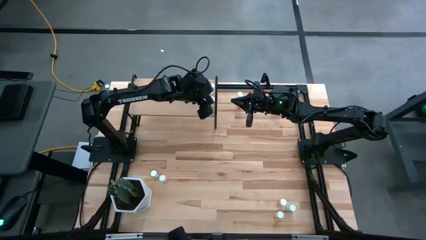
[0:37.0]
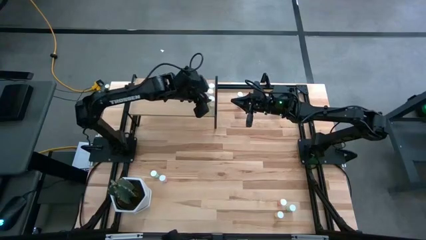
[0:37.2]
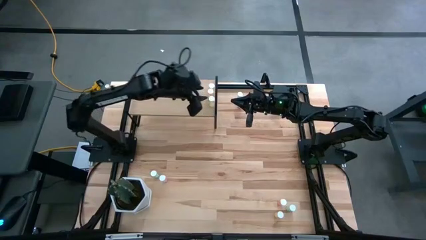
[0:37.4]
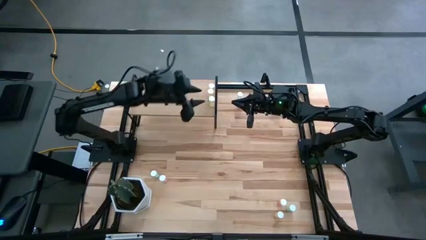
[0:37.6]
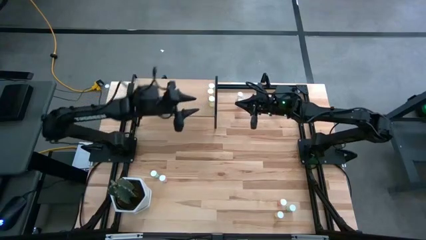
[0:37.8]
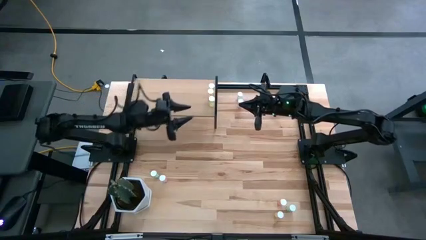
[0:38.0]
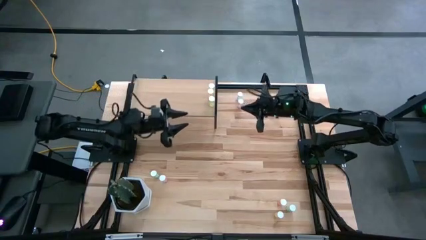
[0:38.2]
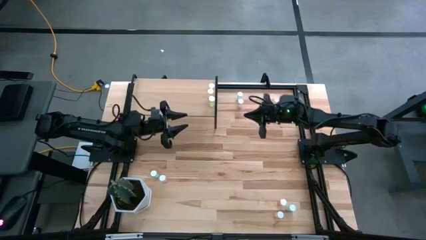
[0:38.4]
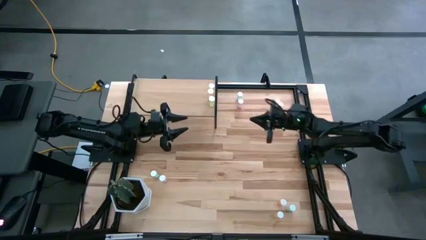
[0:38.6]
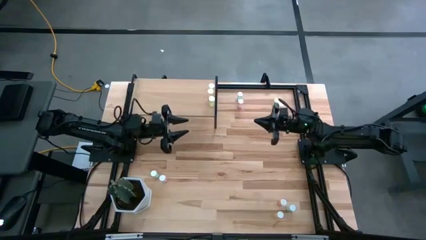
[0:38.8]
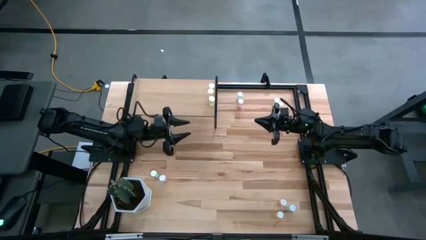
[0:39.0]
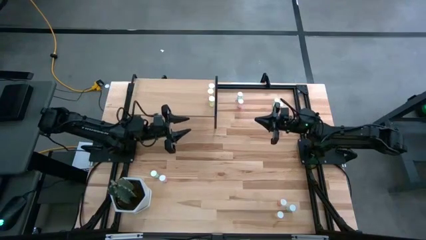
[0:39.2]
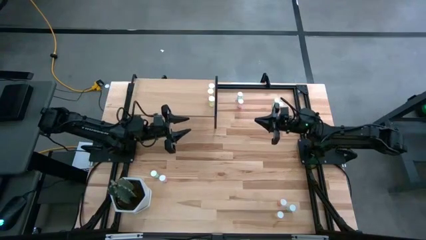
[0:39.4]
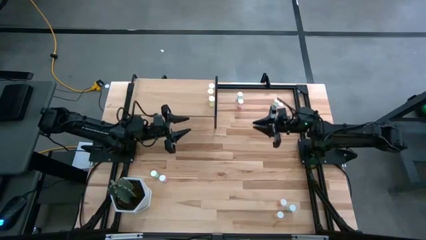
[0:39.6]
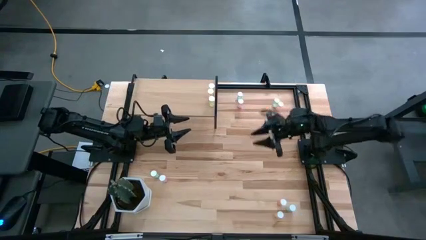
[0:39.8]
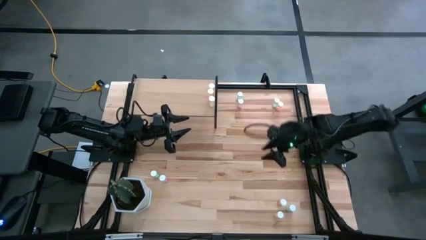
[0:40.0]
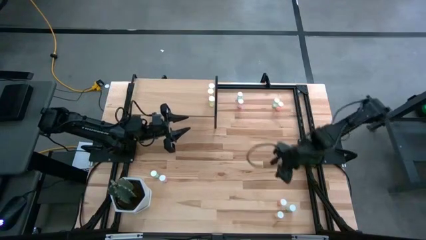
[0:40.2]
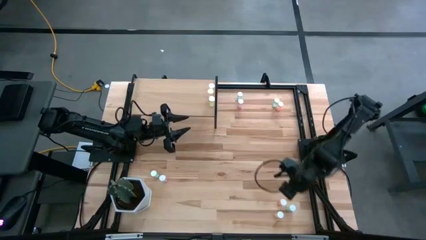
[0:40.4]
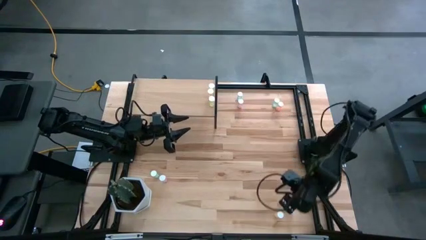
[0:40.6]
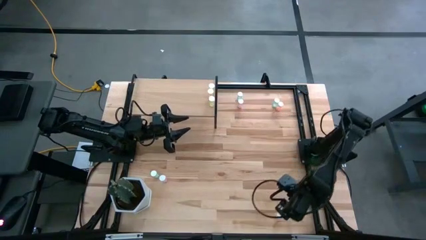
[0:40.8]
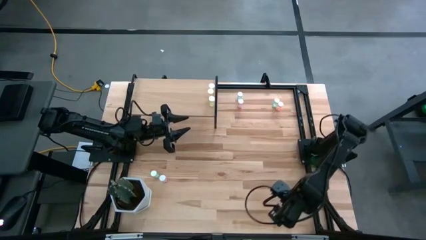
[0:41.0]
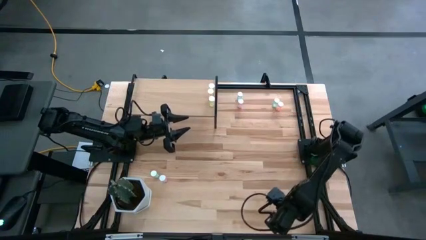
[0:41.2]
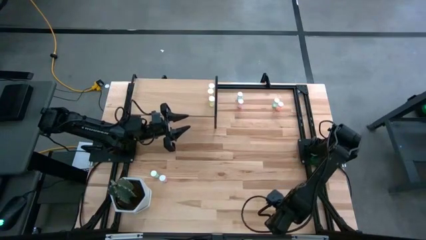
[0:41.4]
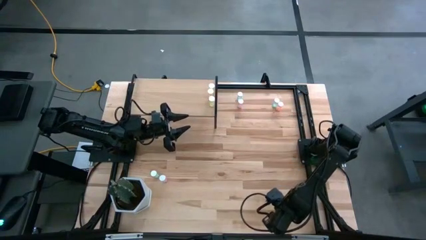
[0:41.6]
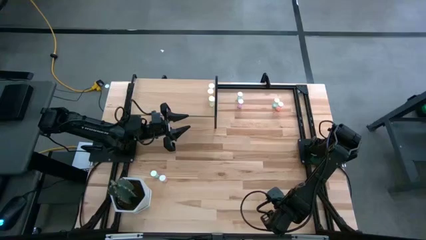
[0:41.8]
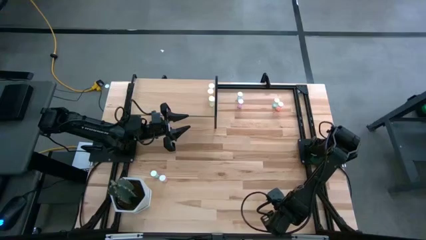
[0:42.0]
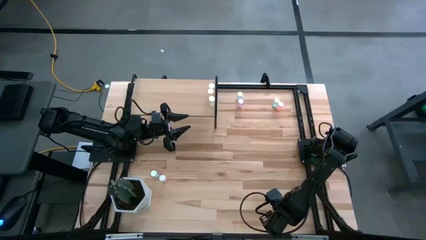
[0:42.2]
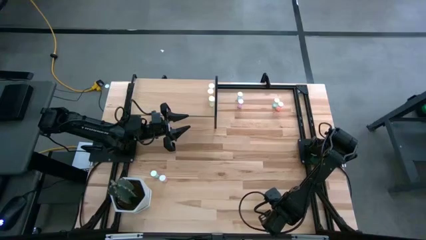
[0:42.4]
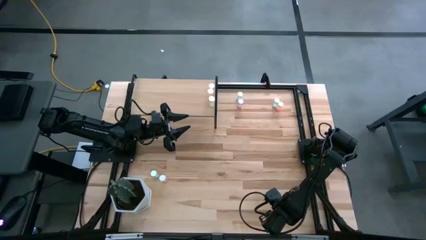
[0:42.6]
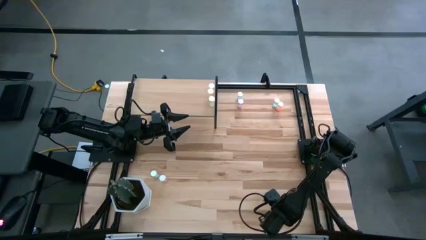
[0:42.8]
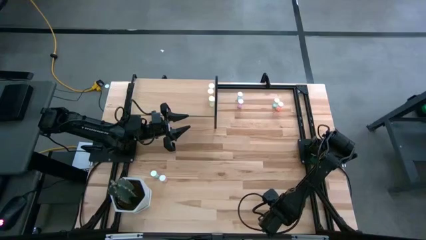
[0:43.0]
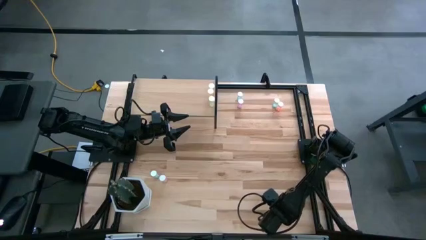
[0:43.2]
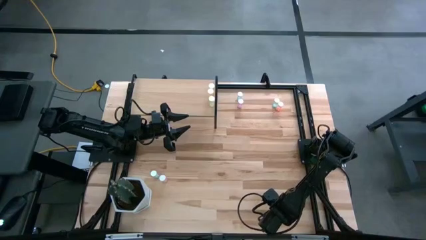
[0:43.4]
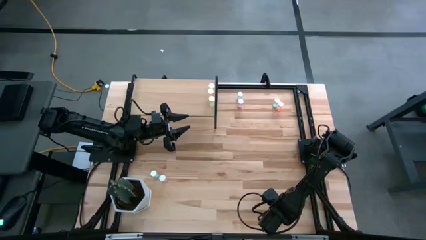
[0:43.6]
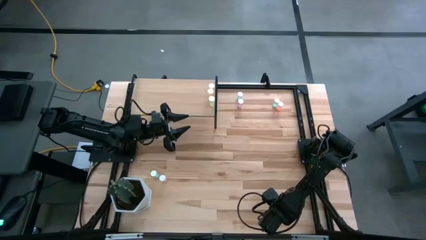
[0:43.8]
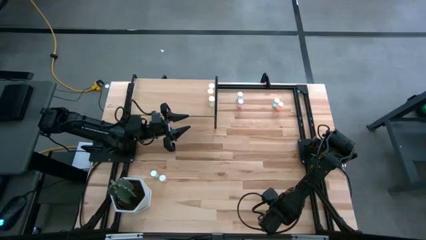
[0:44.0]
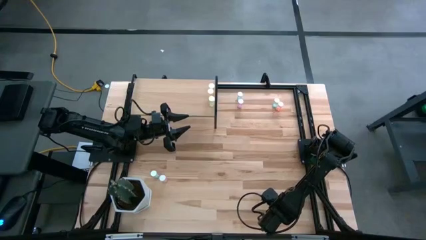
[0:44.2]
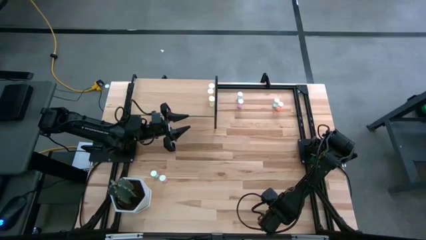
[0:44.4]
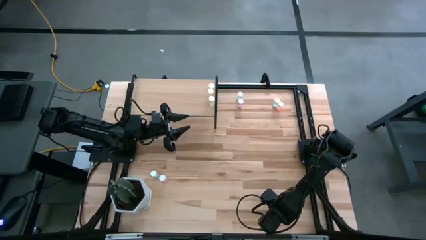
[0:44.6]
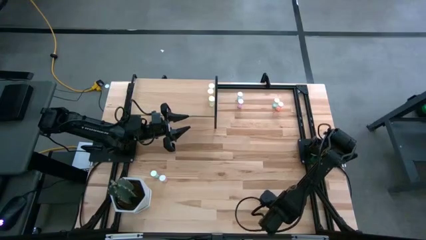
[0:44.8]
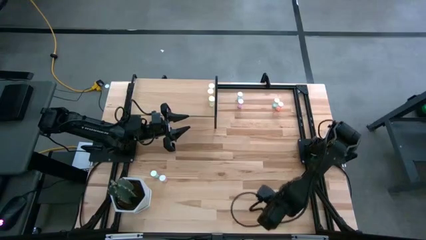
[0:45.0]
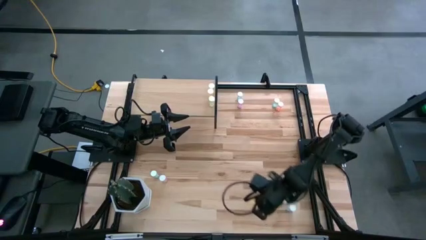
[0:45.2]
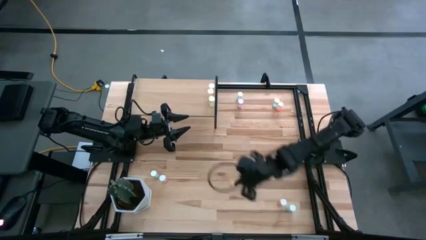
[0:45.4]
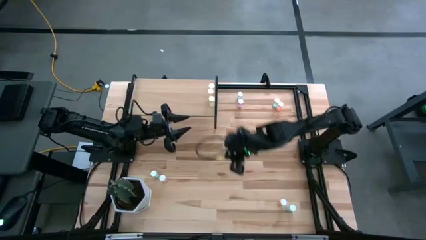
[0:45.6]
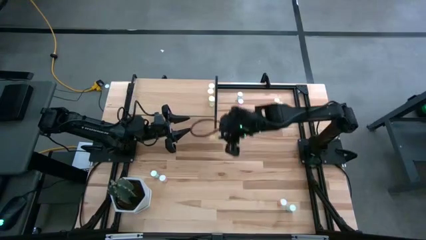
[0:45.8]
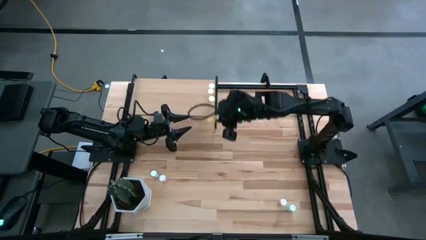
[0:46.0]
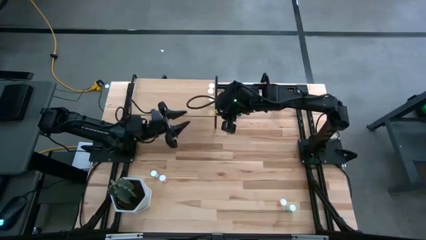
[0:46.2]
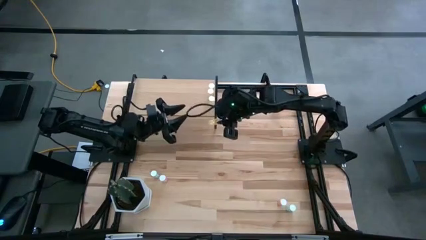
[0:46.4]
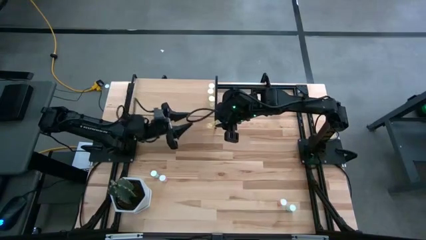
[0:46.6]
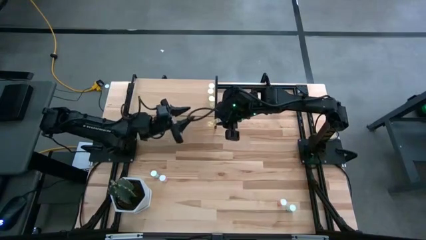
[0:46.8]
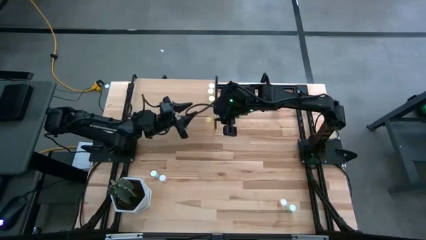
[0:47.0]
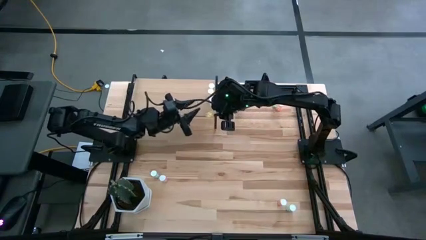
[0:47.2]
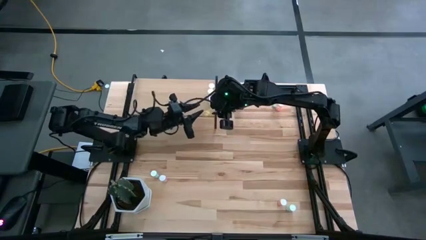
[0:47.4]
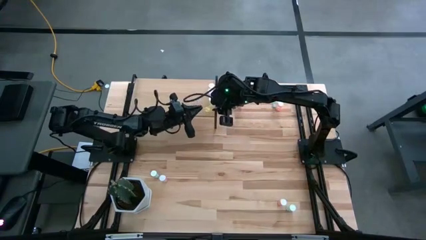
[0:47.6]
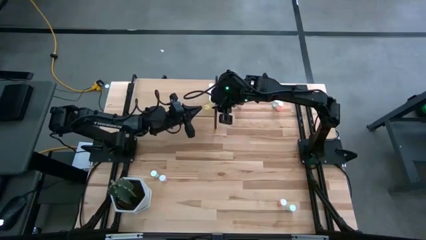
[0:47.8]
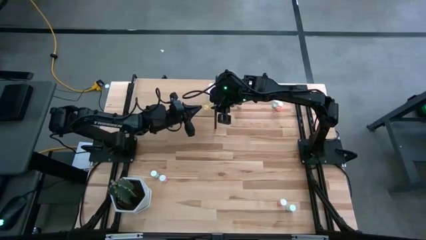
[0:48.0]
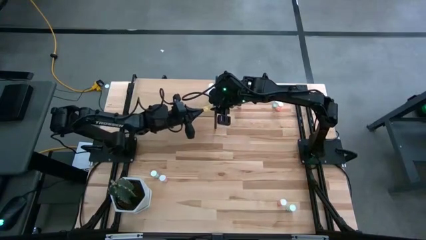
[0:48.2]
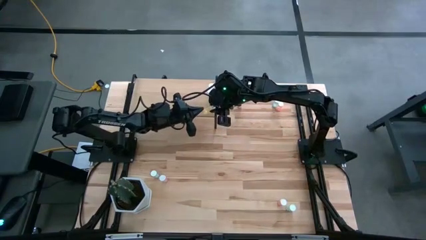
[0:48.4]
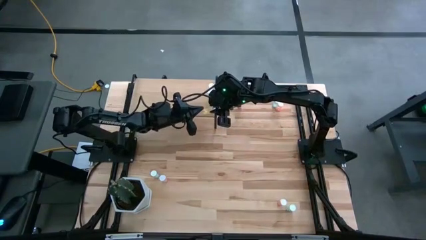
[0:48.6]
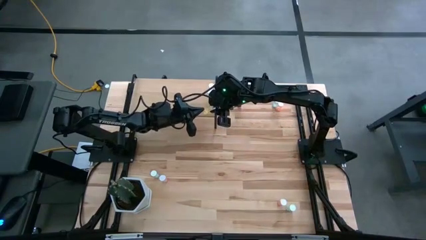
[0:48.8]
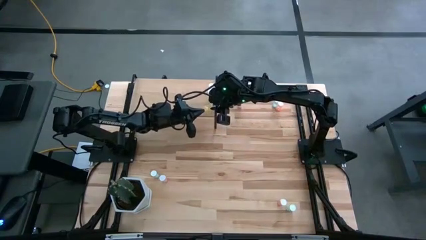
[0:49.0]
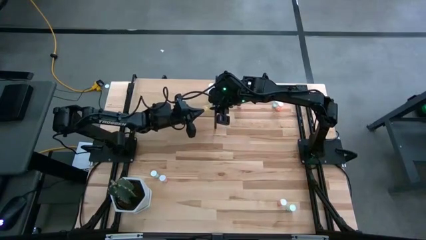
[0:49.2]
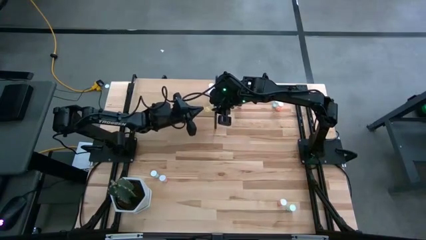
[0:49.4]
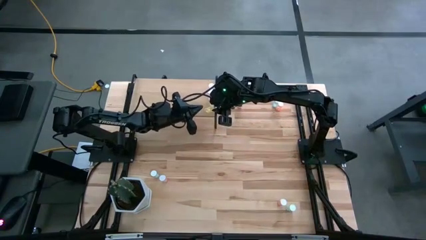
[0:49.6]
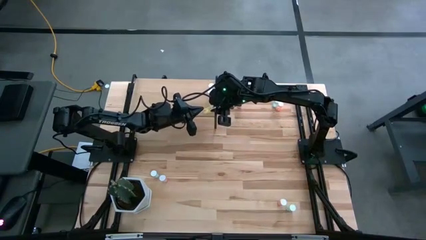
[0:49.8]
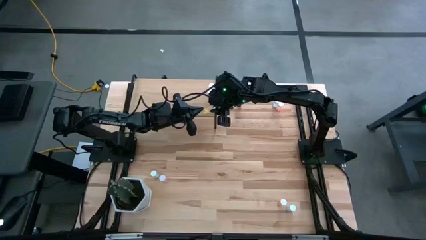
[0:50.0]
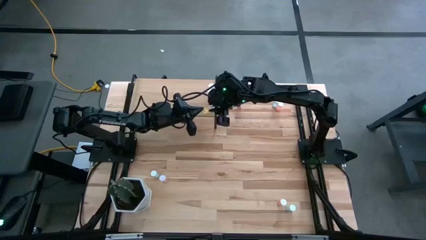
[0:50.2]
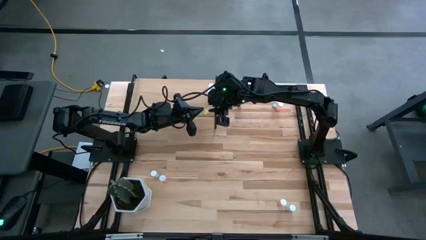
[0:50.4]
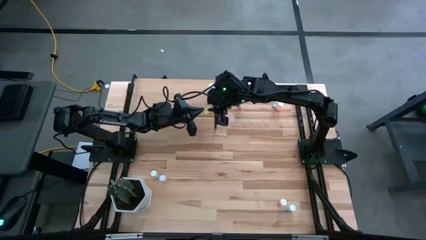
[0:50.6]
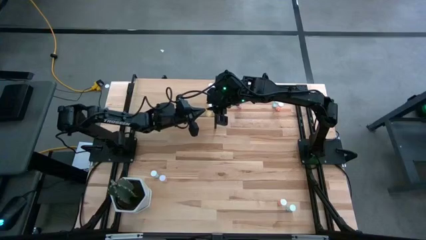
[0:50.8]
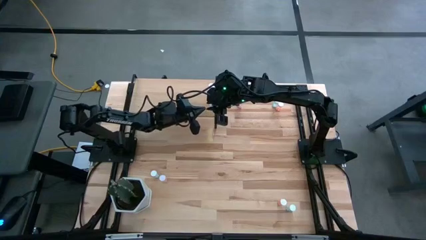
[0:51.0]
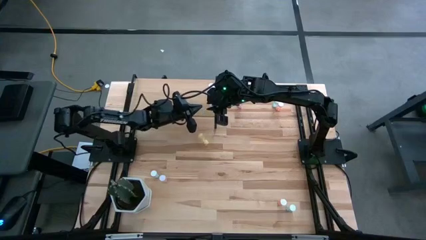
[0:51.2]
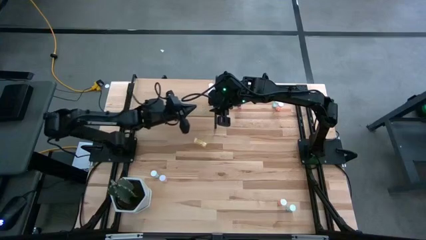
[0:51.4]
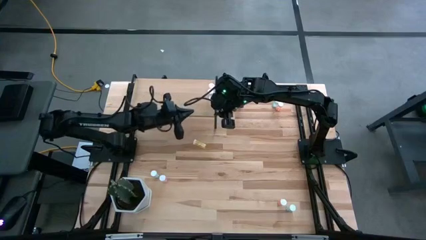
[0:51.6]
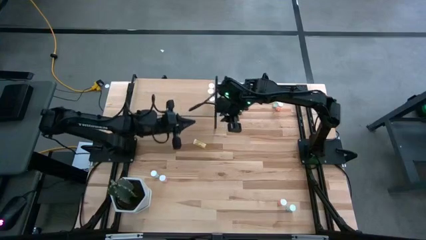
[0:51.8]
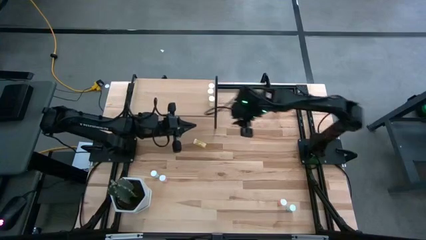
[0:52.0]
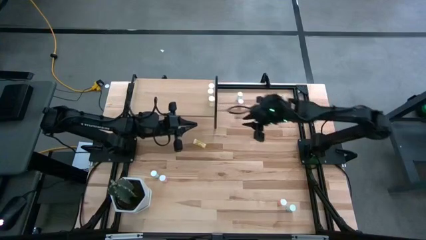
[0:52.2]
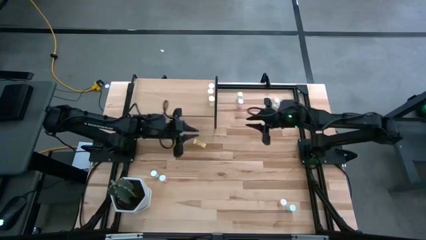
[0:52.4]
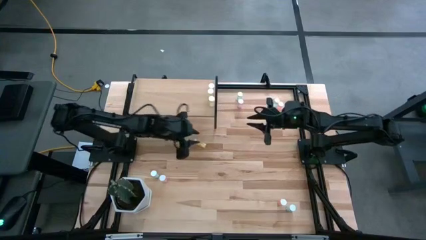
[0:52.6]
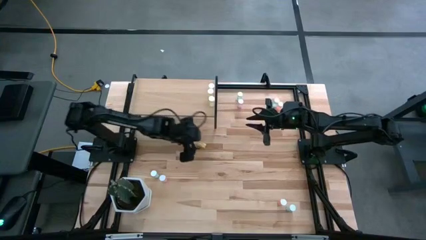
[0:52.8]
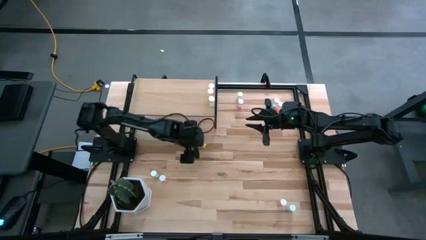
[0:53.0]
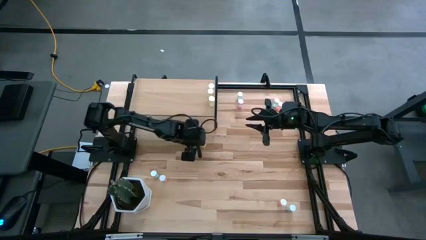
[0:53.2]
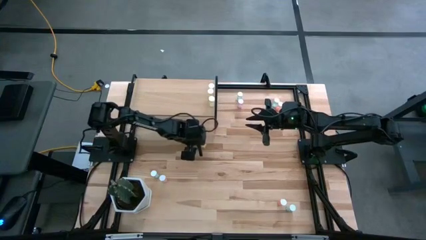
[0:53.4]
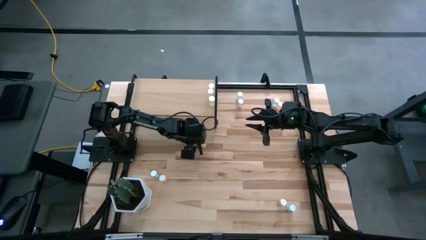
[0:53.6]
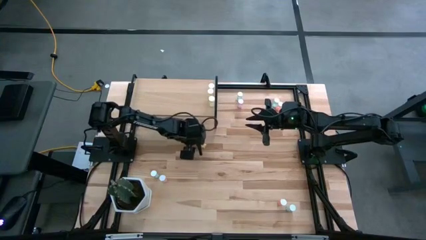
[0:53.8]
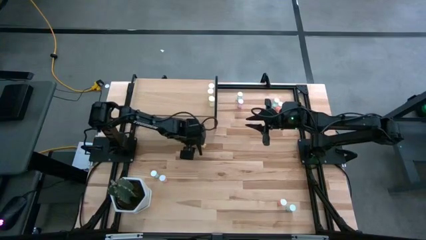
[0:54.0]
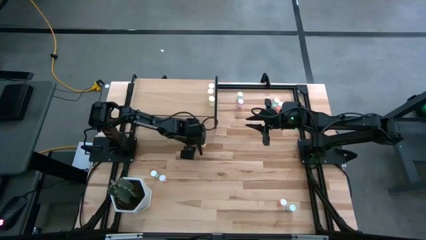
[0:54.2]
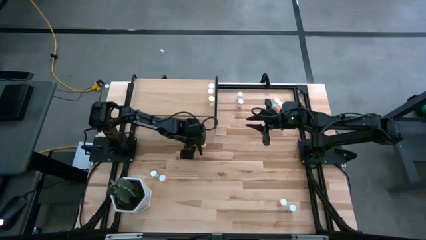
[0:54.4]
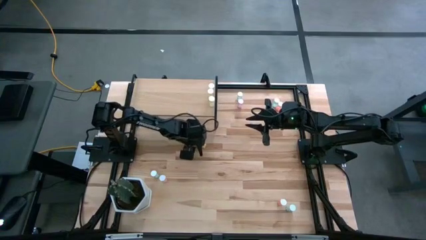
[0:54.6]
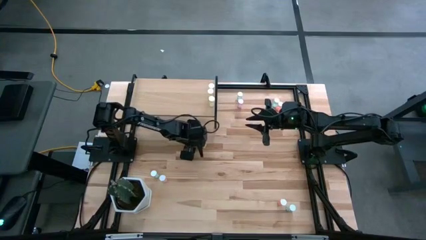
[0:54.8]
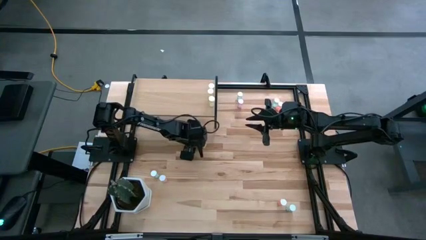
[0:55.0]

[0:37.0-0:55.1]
Task: Pick and place medicine bottles onto shelf by color
Put the yellow pill bottle on the shelf
